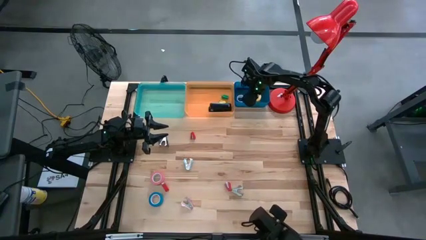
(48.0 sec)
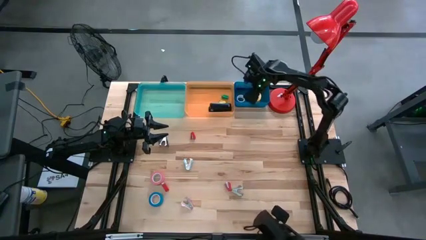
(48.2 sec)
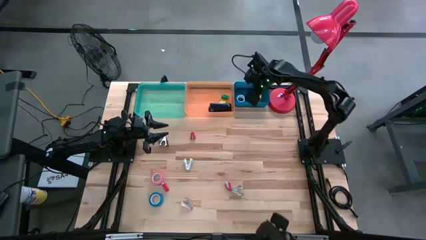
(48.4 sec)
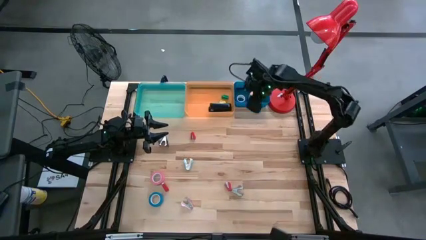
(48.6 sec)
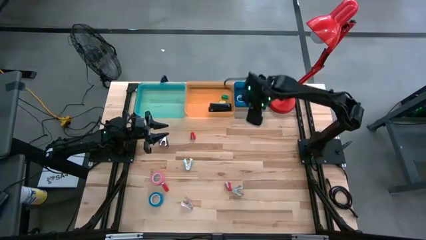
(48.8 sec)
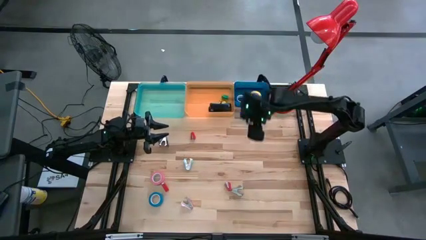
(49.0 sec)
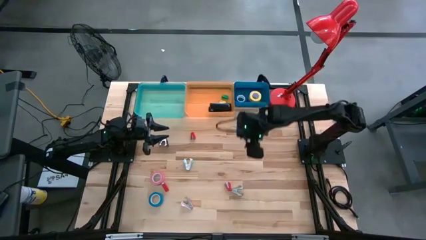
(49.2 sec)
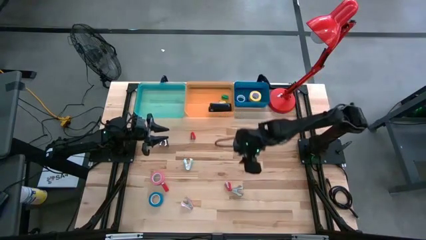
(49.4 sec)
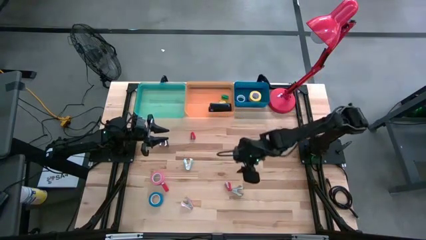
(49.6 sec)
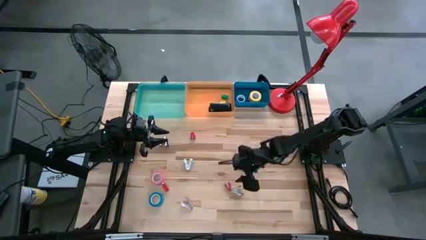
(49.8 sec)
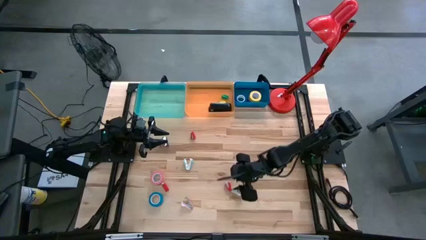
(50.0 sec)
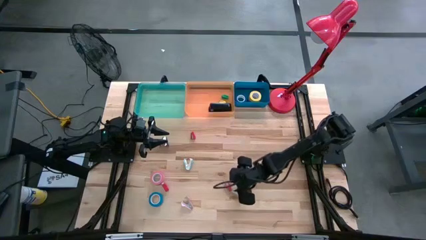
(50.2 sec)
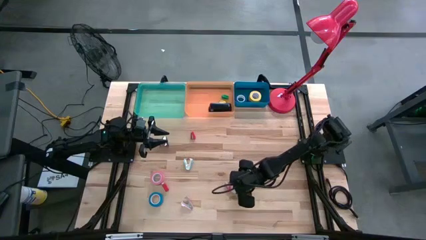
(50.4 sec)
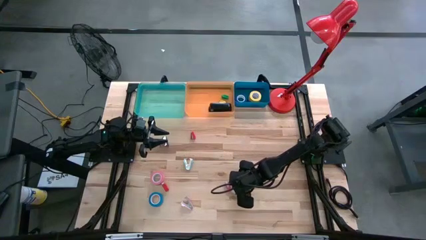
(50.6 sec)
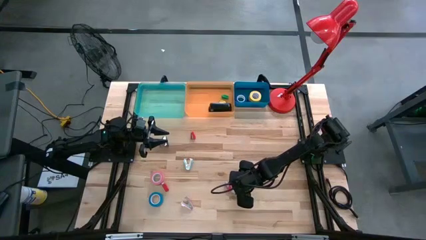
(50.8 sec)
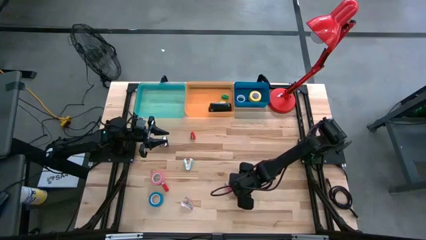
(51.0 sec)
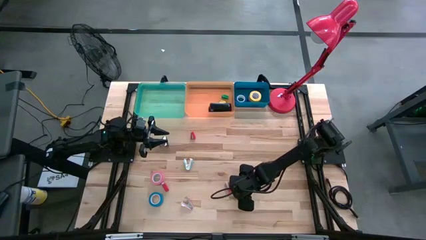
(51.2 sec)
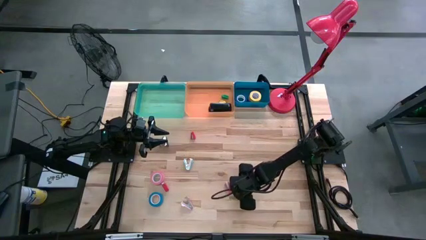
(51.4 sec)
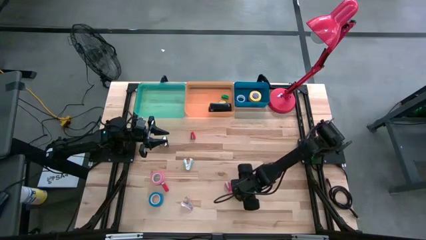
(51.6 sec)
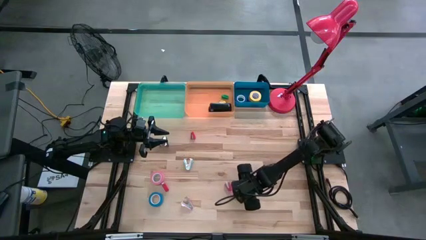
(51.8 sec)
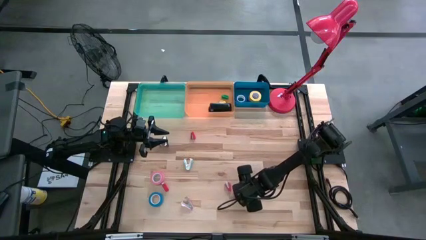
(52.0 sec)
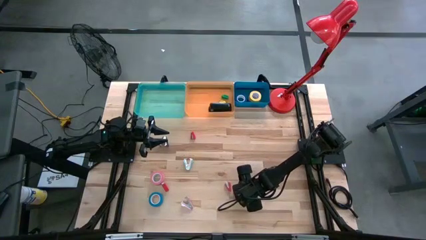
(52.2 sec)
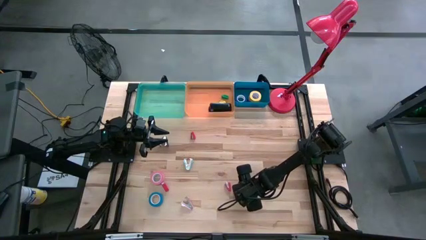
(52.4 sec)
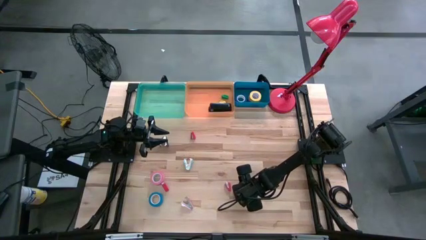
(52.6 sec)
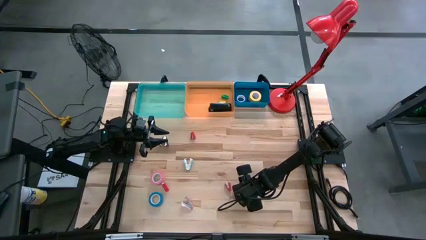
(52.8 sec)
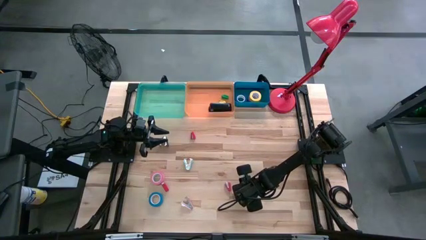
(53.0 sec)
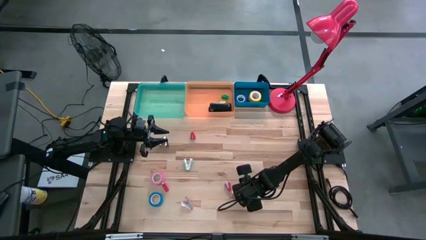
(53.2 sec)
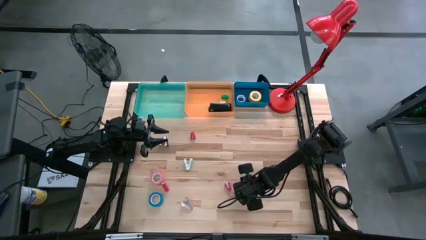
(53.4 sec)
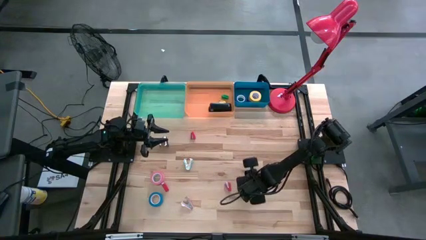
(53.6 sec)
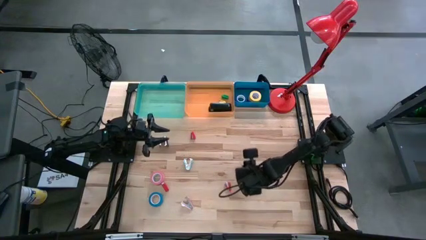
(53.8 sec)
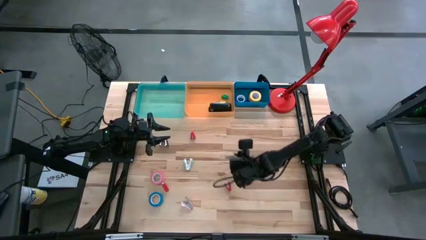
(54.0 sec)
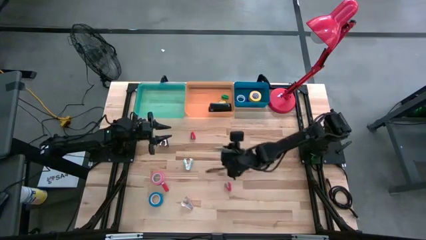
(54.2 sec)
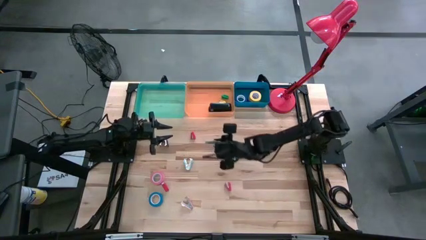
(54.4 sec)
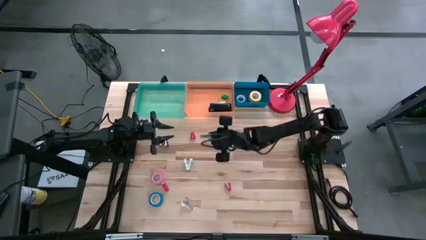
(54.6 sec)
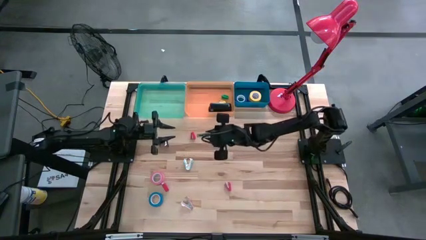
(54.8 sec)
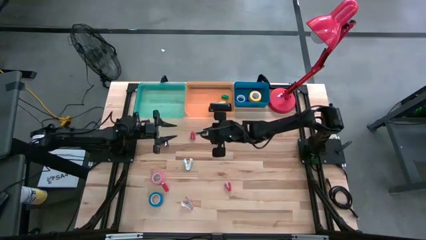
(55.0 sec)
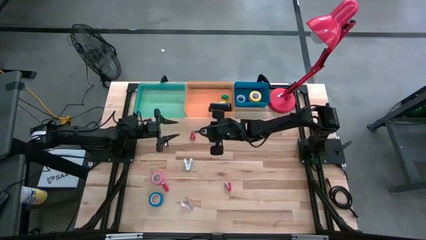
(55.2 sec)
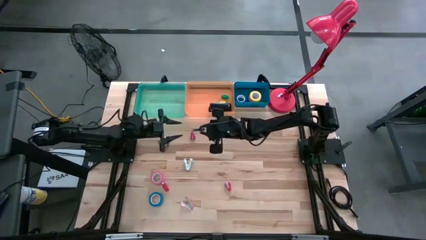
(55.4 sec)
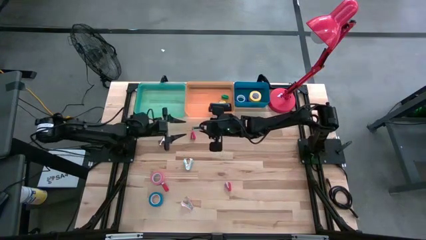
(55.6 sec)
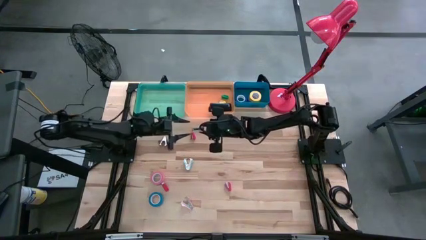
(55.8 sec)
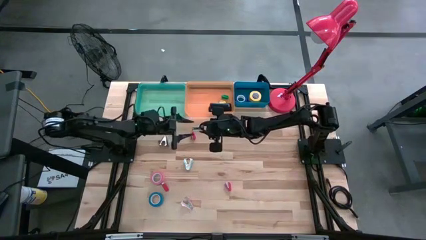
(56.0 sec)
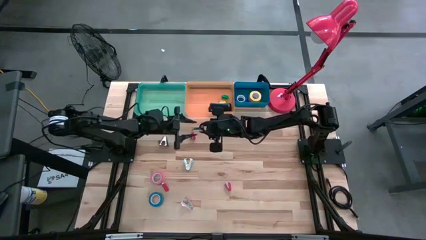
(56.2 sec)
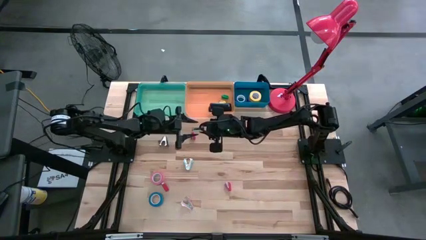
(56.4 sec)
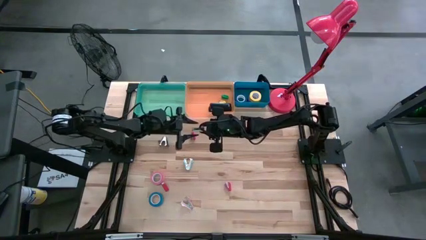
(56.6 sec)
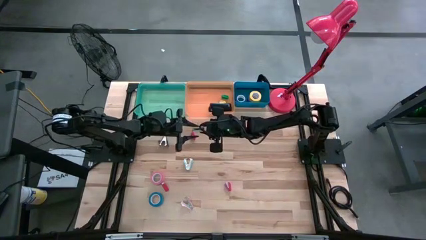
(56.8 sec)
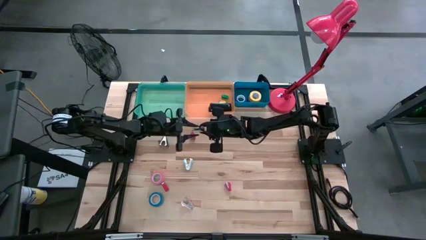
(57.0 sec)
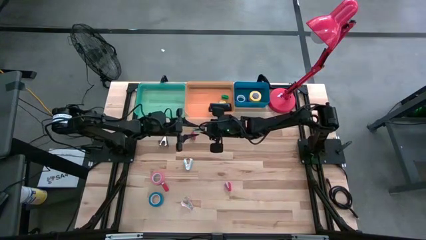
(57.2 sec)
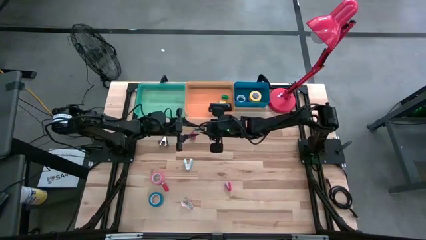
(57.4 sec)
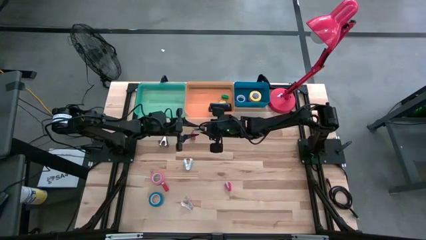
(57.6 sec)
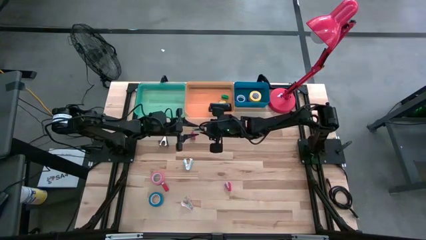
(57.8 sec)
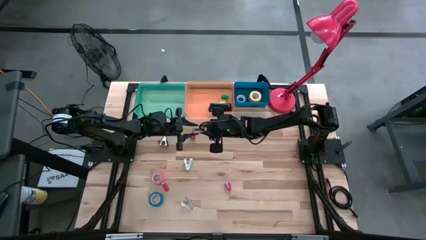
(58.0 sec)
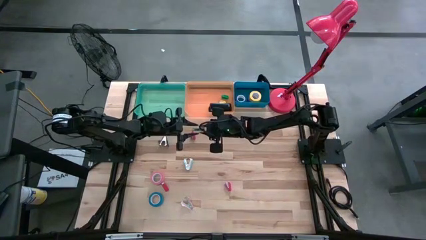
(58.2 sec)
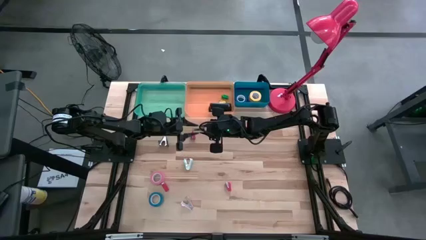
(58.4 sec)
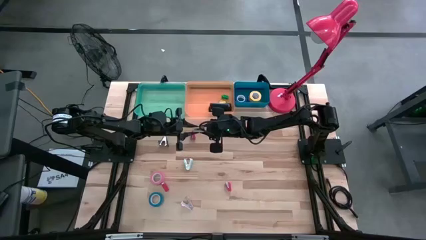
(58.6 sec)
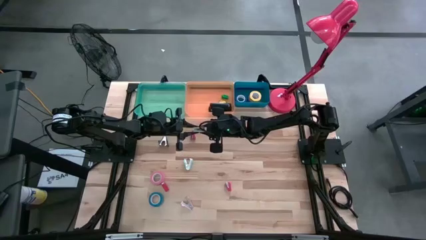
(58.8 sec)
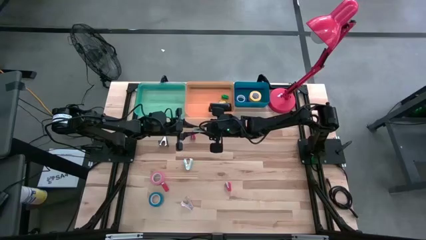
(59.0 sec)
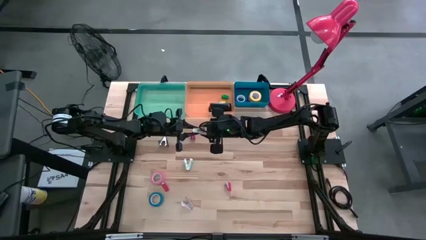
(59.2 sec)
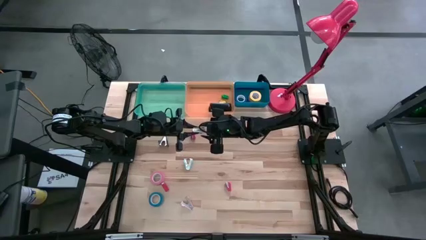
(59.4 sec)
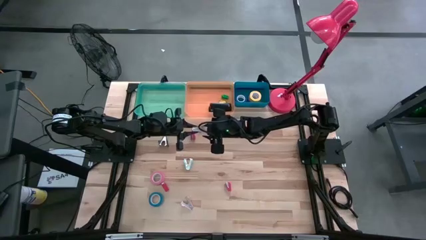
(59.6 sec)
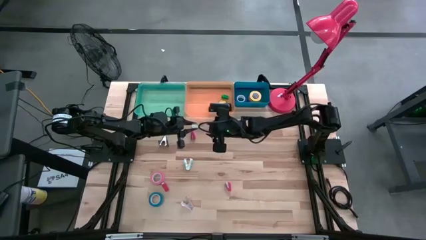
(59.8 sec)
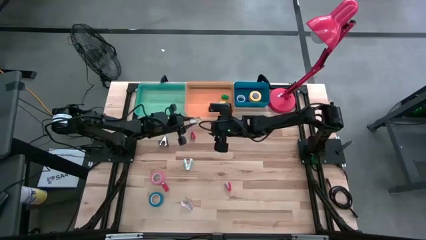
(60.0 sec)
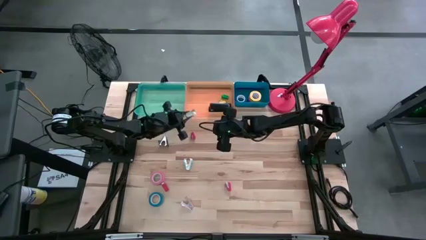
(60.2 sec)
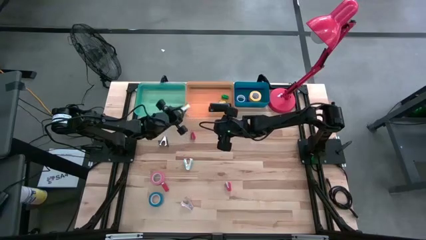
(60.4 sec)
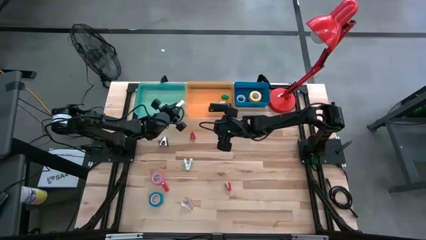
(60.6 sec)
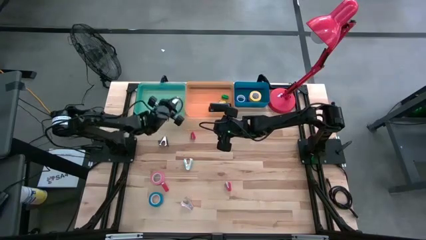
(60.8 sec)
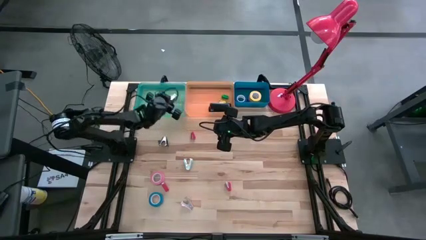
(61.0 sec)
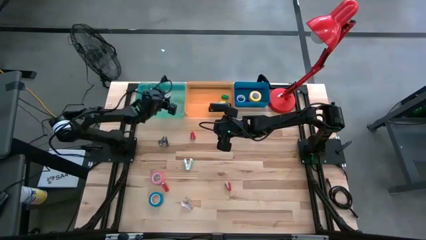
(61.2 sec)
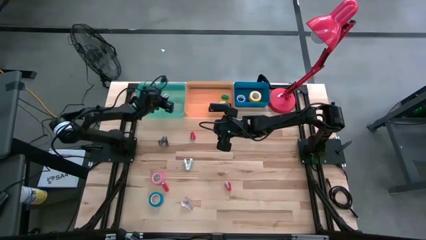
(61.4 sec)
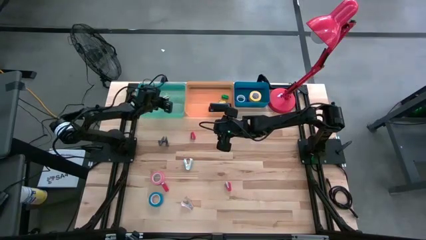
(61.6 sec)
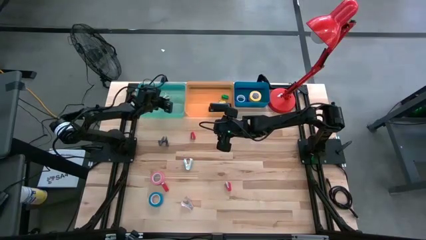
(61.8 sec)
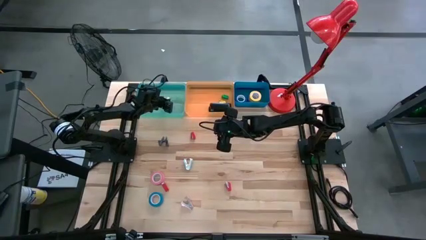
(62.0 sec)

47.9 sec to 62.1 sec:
Task: Pick and place Stapler, Stapler remover, tape
Put the gray staple remover into the green bin

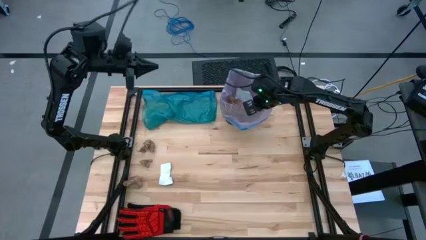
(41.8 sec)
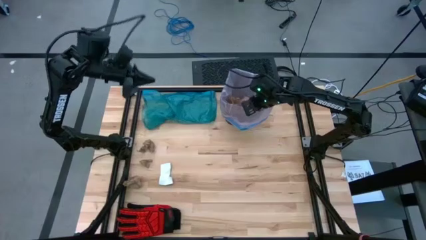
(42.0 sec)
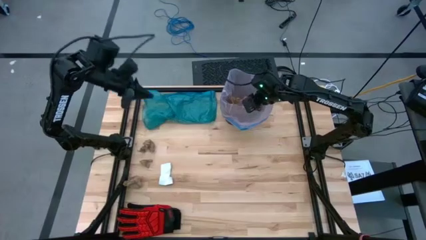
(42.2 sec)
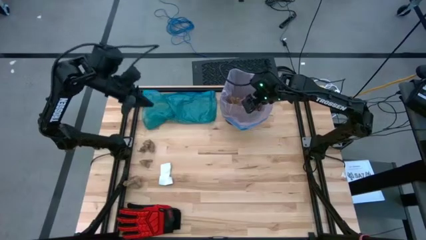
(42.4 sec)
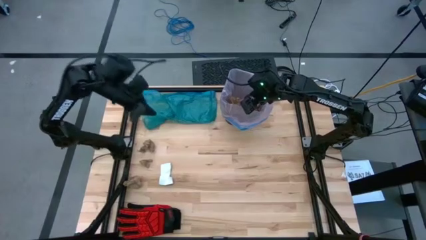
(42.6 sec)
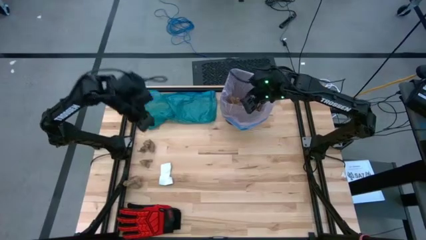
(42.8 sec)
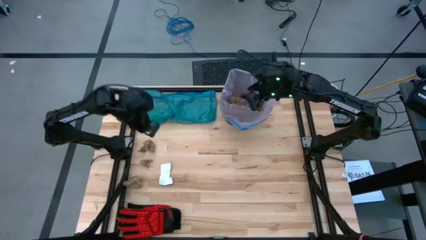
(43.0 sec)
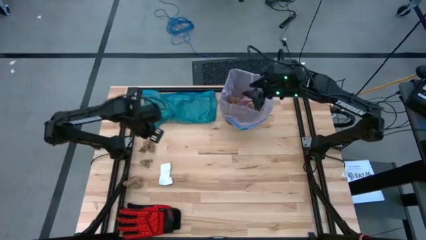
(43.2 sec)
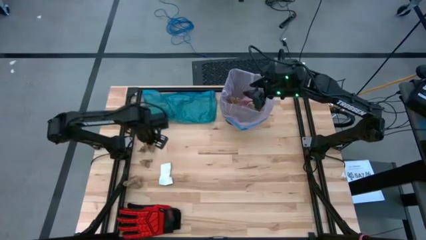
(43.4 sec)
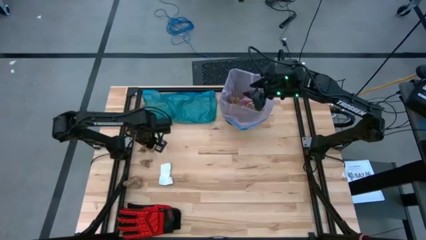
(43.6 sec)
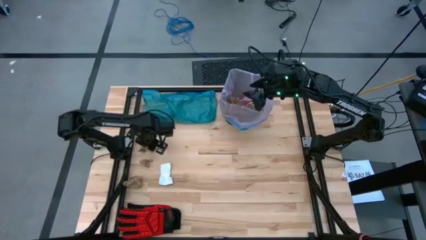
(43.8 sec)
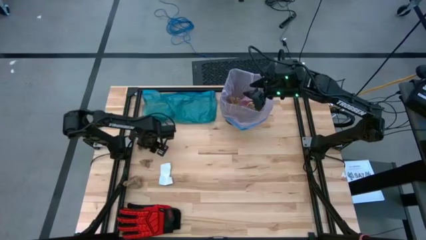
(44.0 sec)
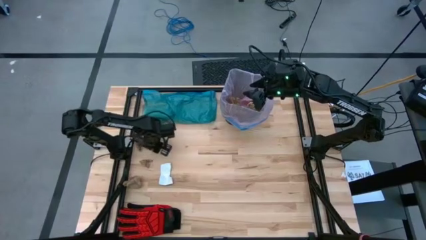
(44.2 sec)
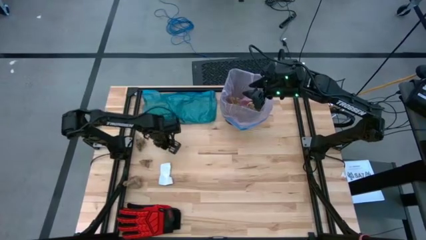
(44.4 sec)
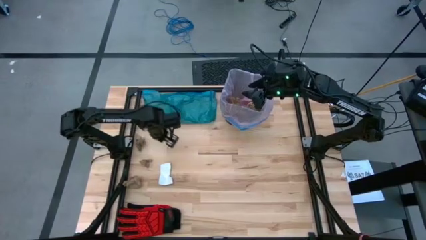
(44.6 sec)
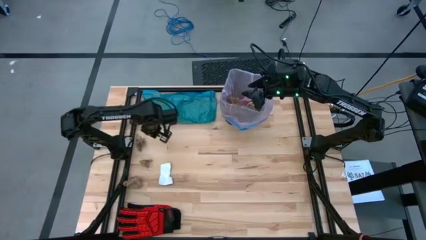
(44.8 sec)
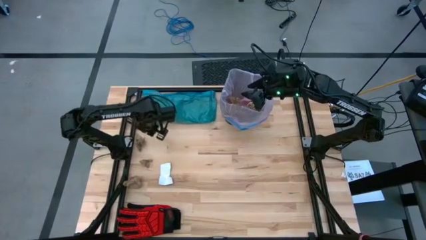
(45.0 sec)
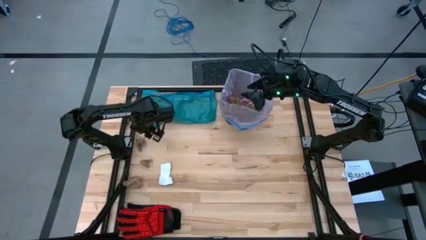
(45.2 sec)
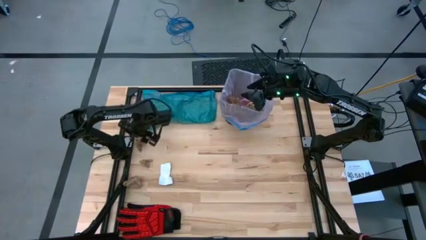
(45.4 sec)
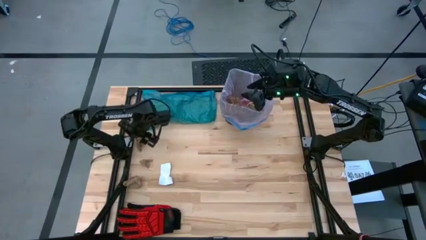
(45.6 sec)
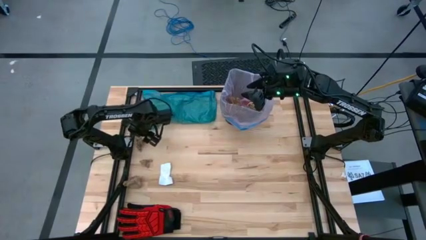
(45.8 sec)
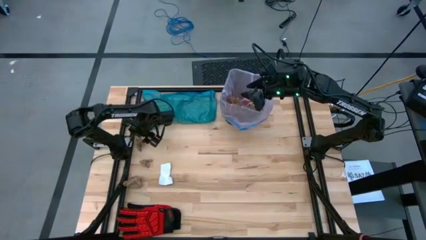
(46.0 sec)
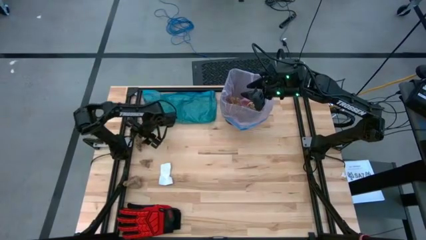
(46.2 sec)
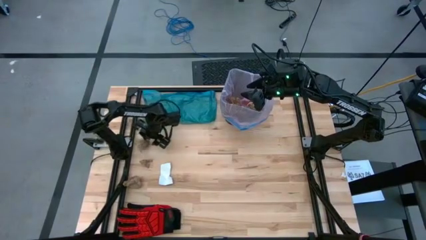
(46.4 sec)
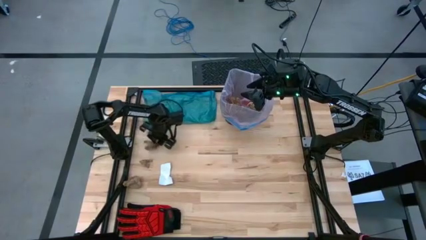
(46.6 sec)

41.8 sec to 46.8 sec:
Task: place trash/remove bag and relplace
Put the brown paper into the black trash bin
